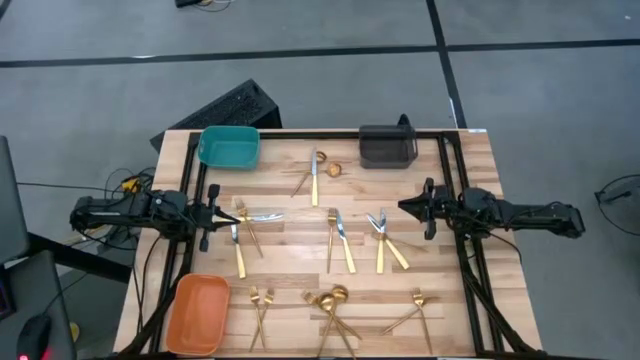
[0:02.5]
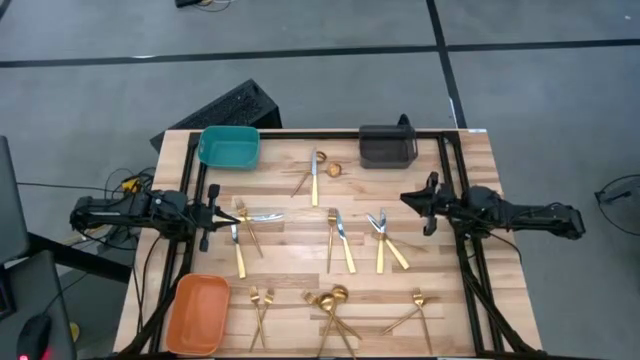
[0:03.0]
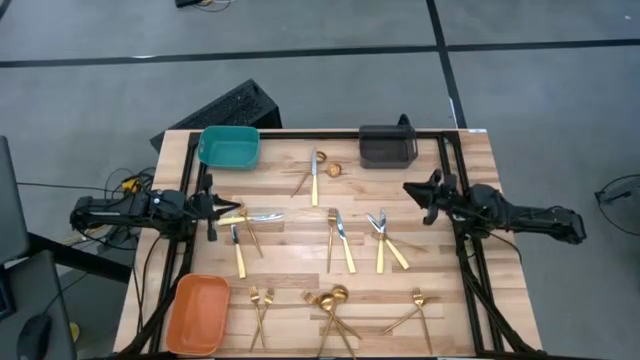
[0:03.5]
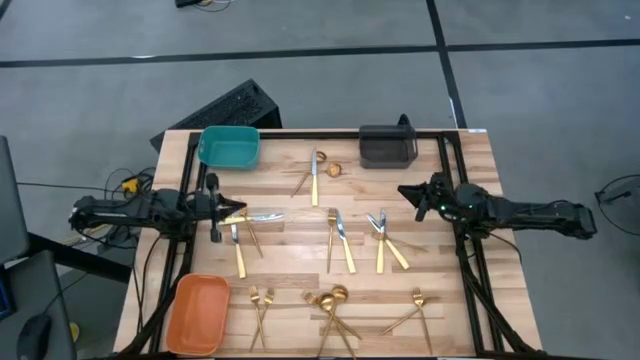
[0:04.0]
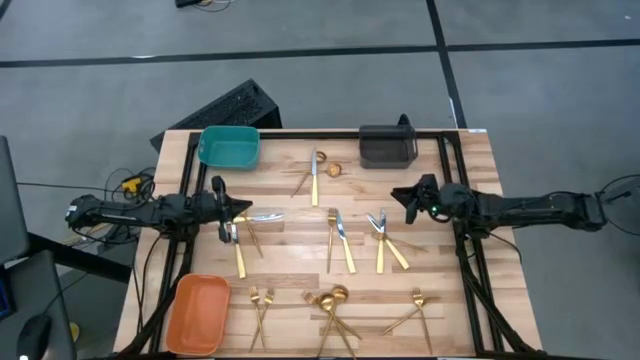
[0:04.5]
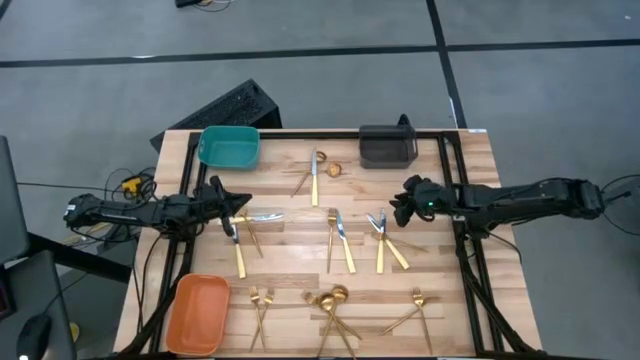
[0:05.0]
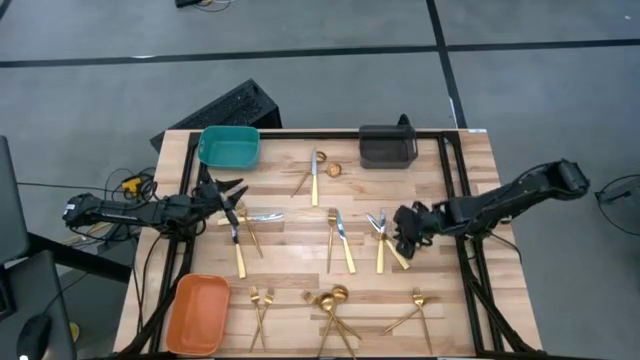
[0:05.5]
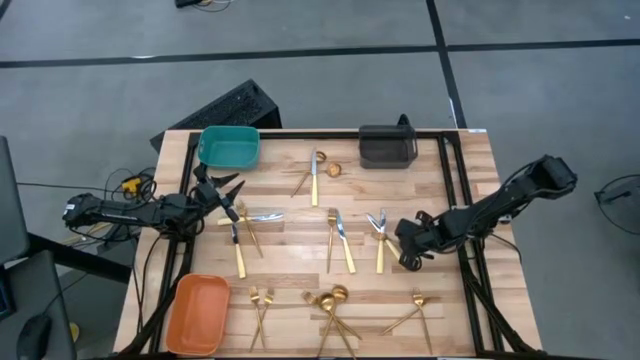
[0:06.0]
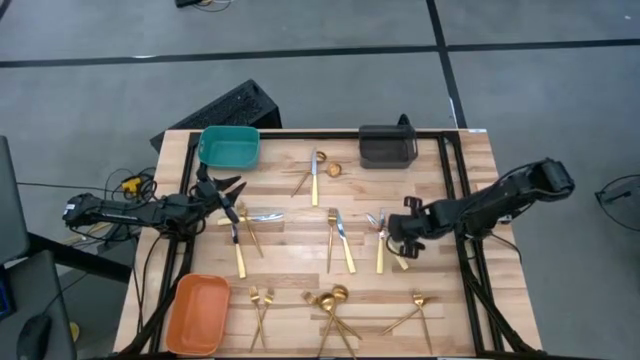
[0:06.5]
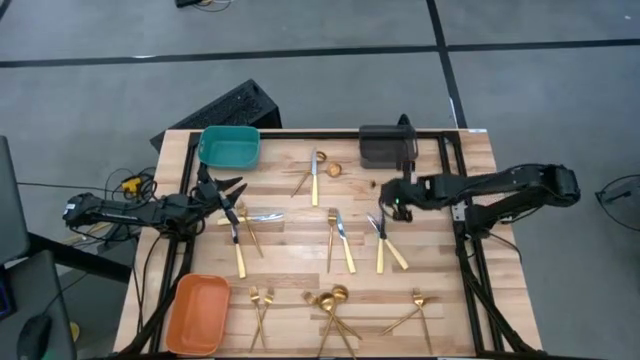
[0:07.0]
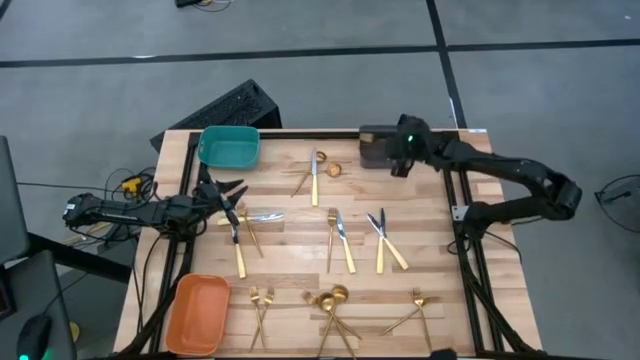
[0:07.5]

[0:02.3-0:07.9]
Task: Sort silverware by color (type)
Put the fork into the black bin

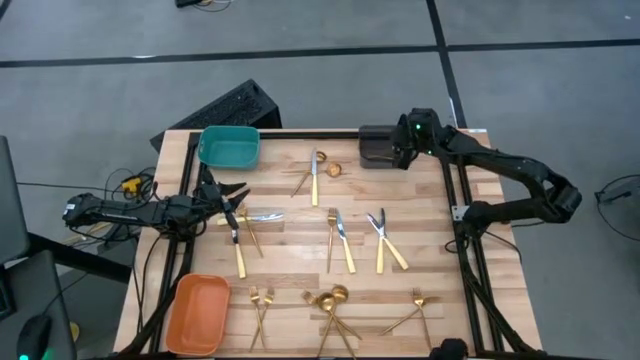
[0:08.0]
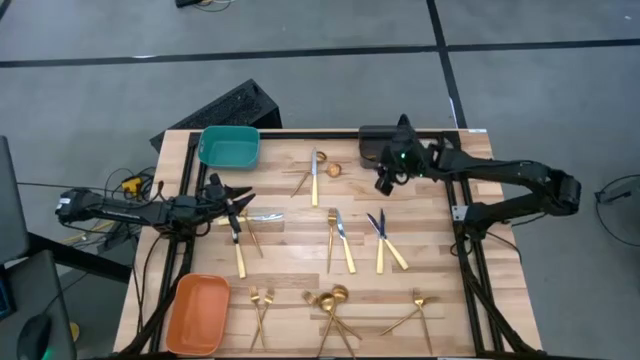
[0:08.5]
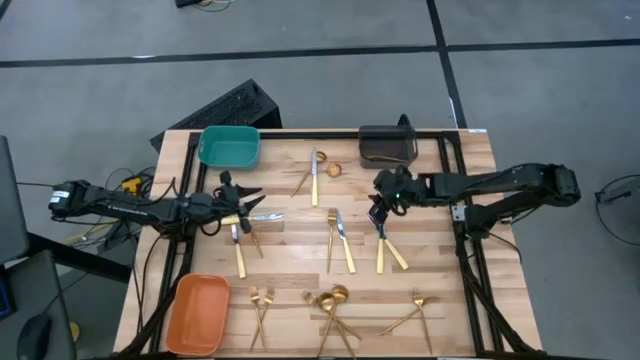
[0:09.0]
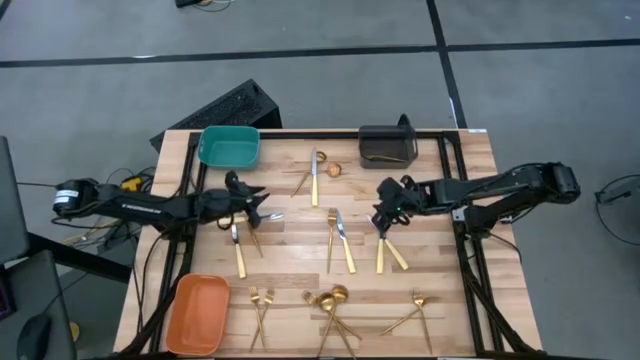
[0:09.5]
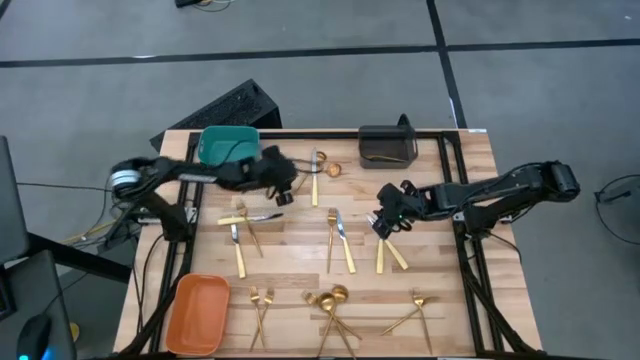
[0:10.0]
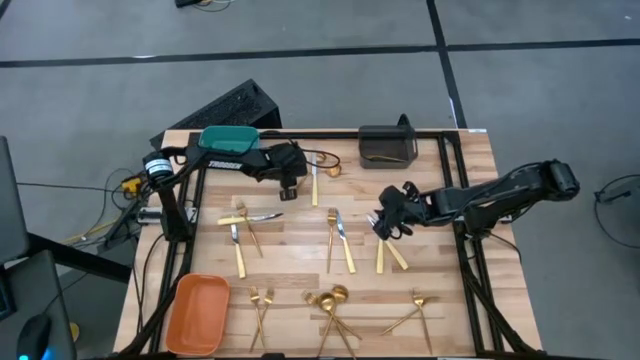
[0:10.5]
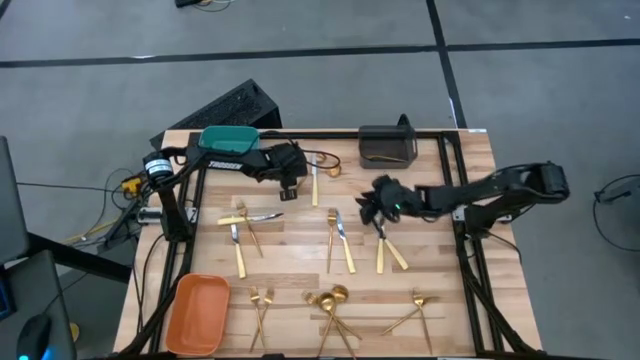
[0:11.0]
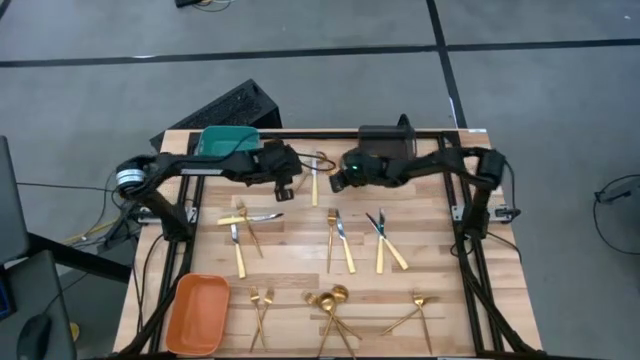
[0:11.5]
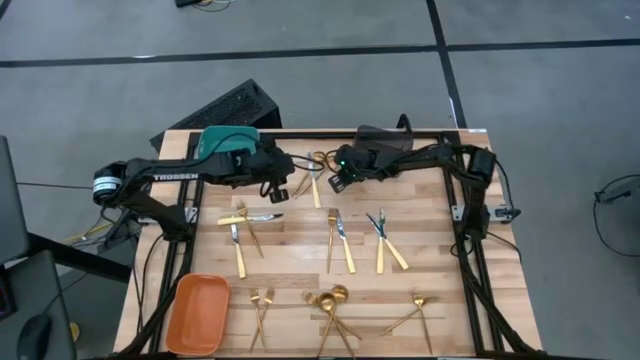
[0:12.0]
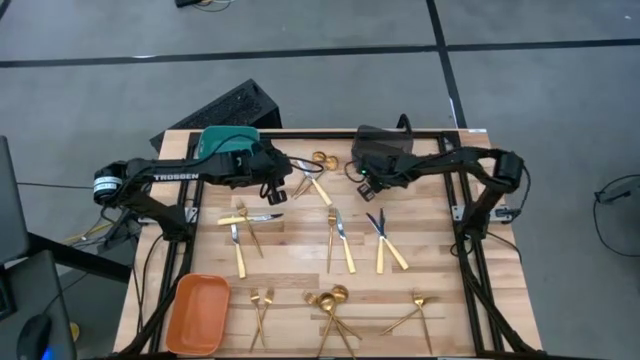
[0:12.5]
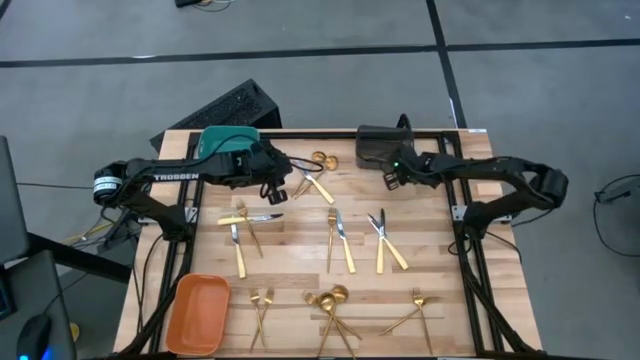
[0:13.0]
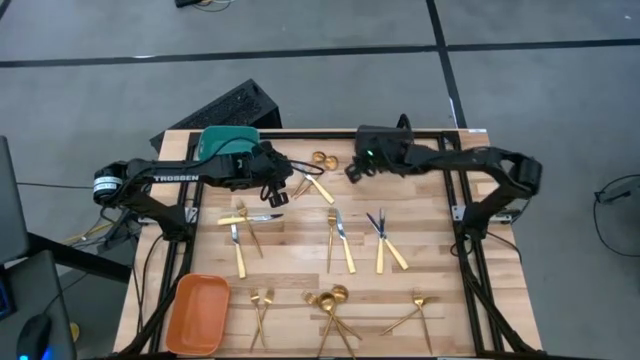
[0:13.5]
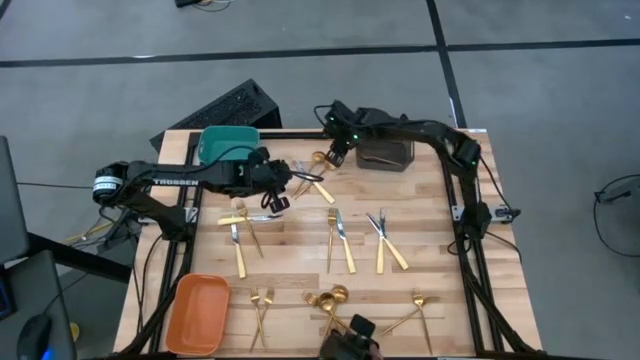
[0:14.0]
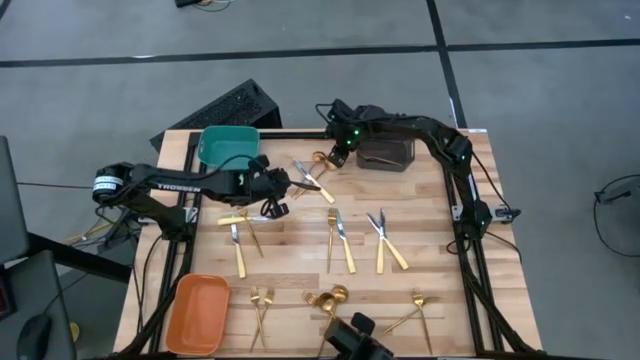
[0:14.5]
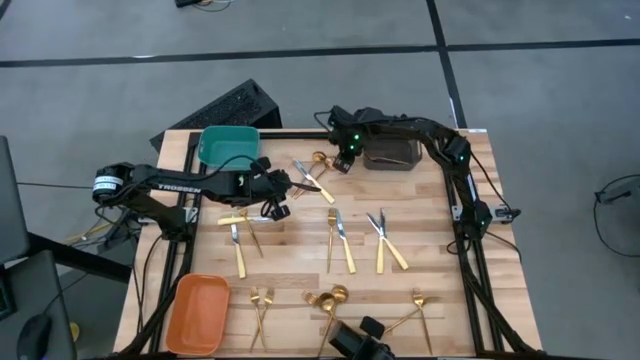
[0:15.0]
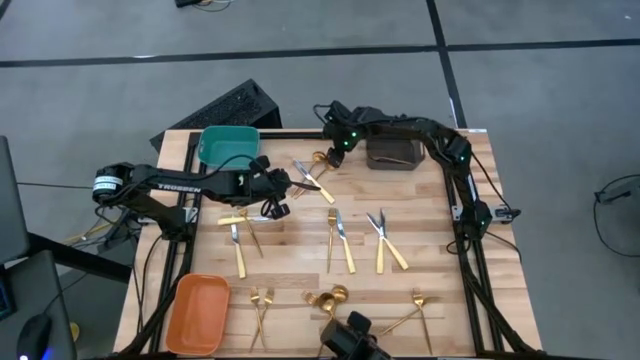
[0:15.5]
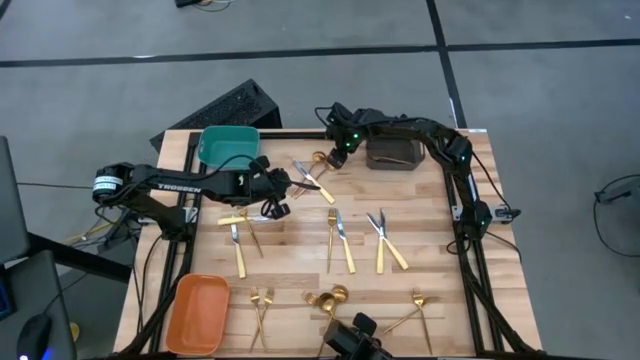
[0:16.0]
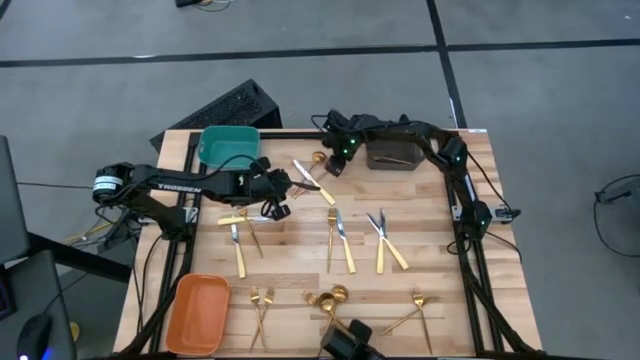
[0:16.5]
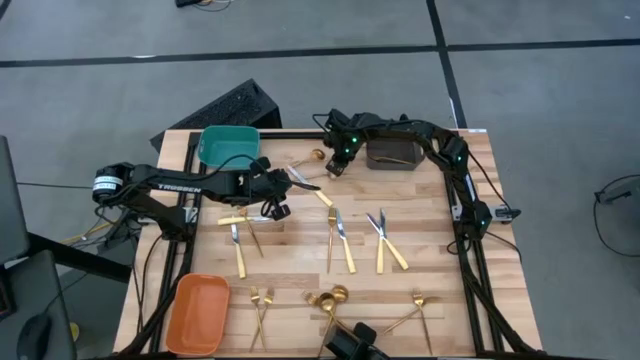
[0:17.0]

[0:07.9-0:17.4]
Put the spoon into the green bin

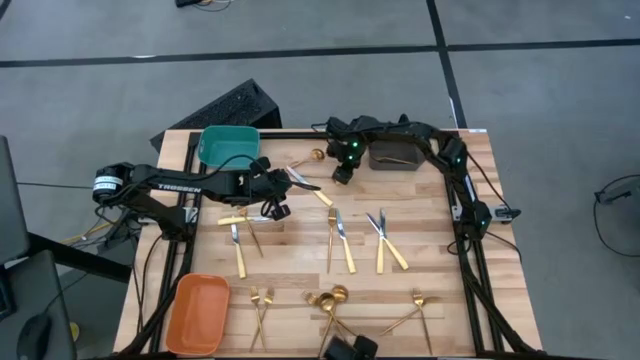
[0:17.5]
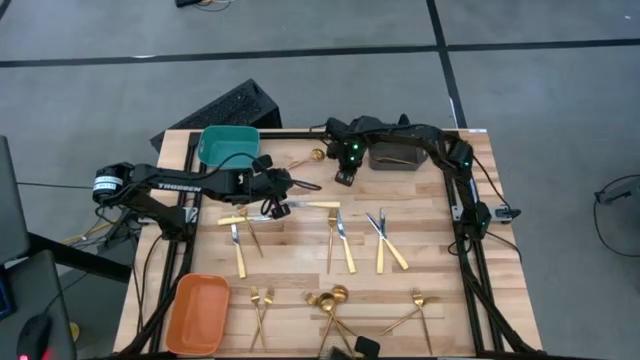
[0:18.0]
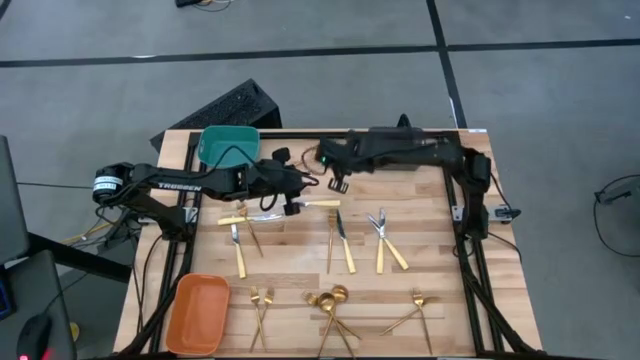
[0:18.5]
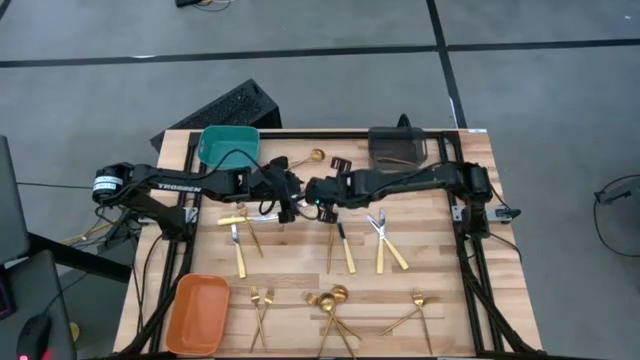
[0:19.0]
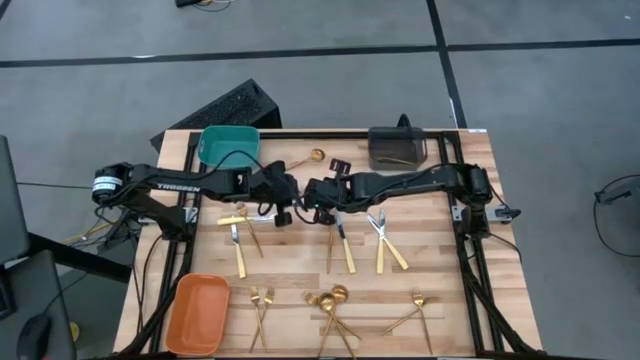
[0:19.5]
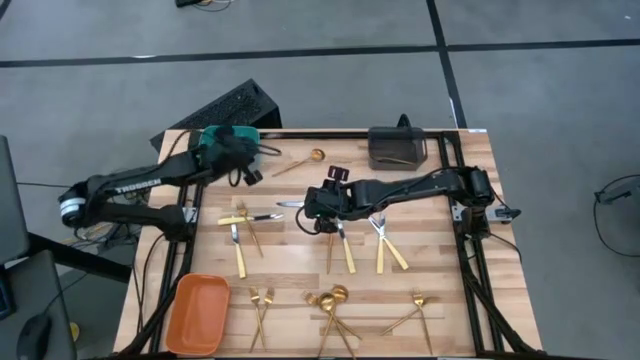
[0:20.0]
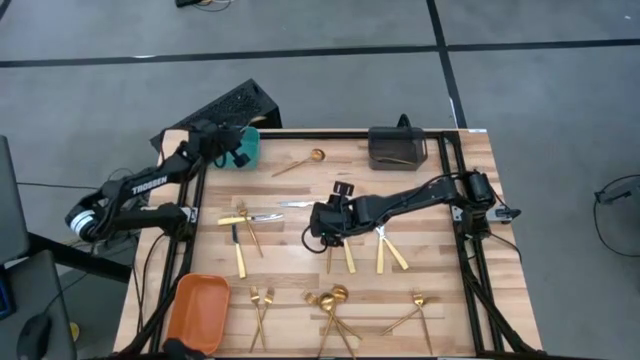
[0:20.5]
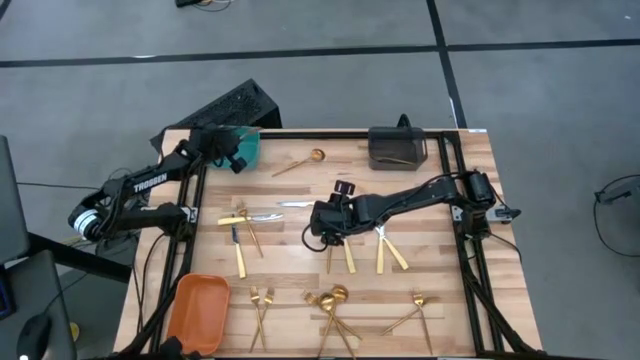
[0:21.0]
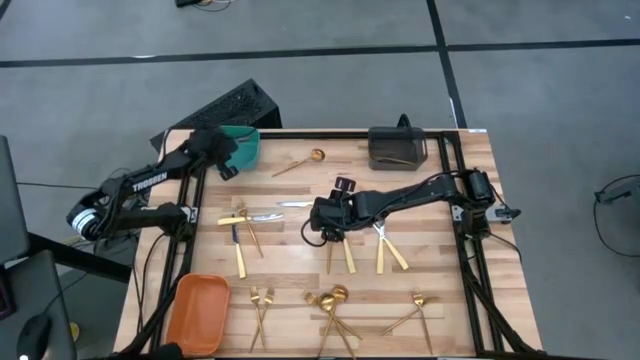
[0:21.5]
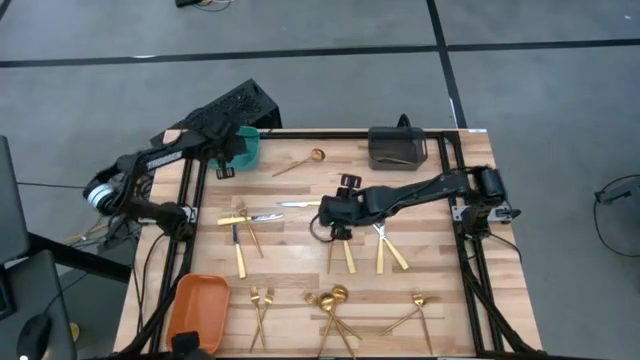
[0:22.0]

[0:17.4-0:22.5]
Put the spoon into the green bin

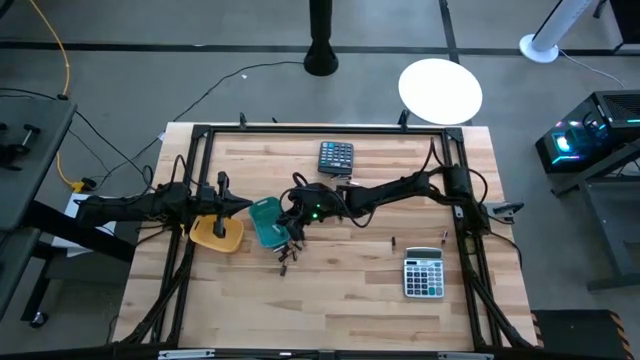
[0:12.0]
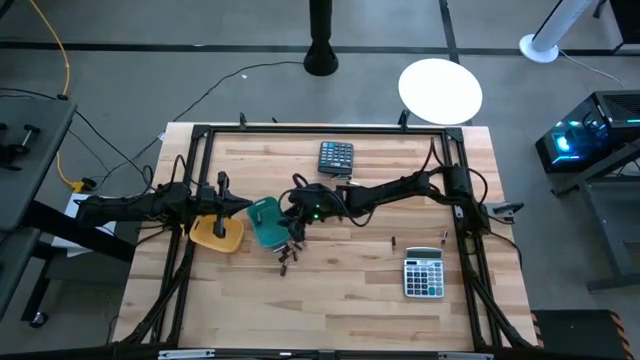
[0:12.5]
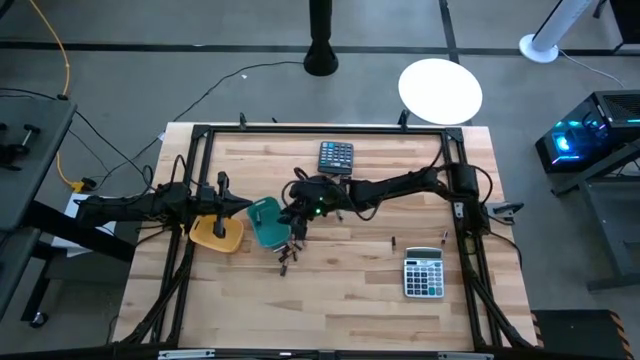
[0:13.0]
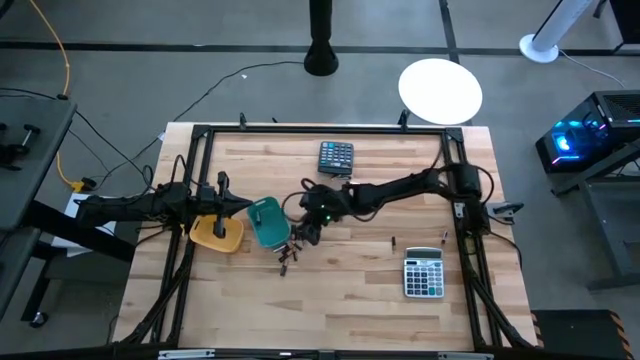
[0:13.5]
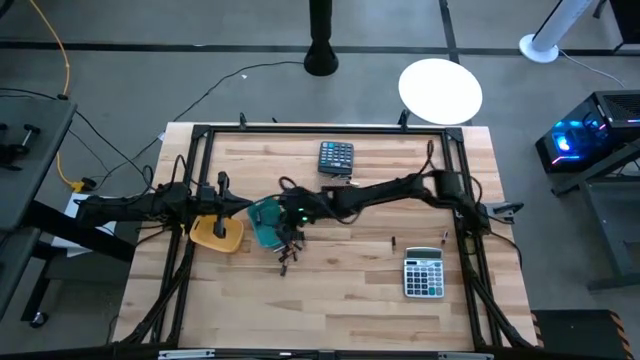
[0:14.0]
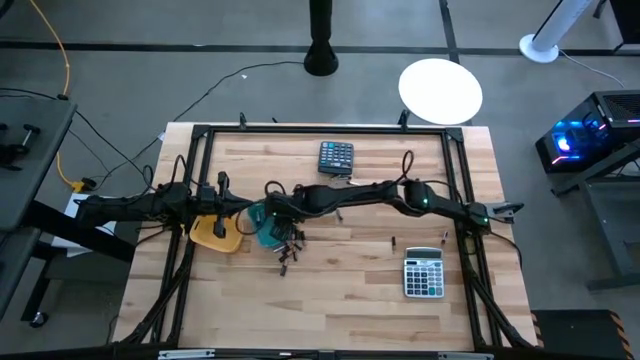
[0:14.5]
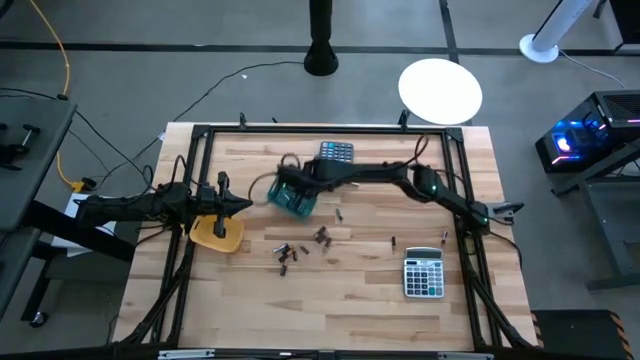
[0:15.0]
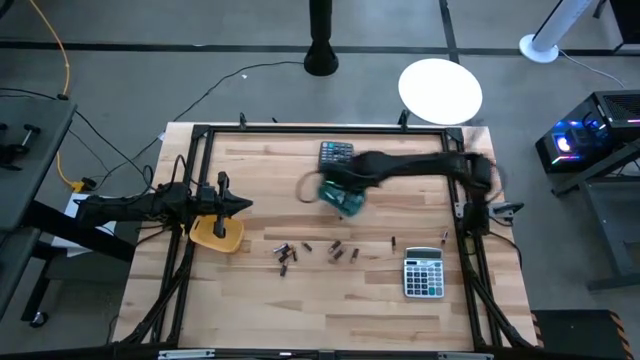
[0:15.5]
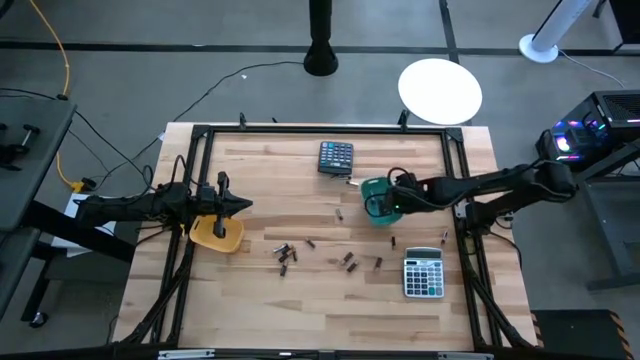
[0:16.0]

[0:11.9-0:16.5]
Task: Sort batteries
Move the green bin to the middle right of the table
